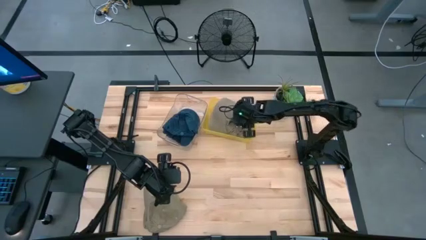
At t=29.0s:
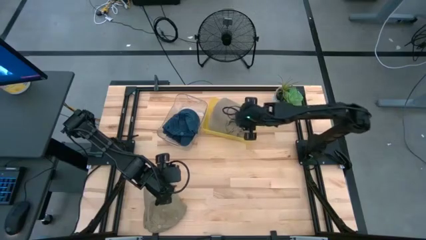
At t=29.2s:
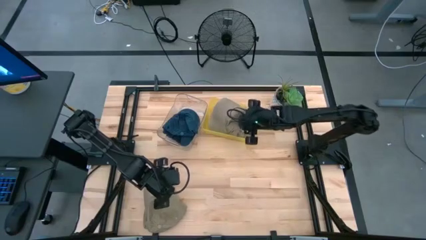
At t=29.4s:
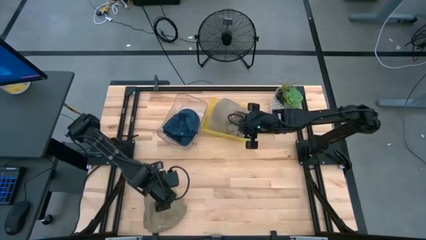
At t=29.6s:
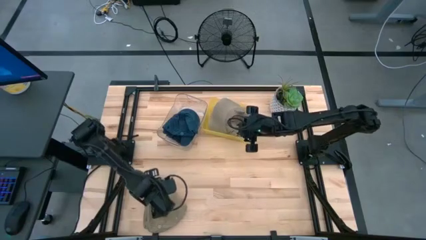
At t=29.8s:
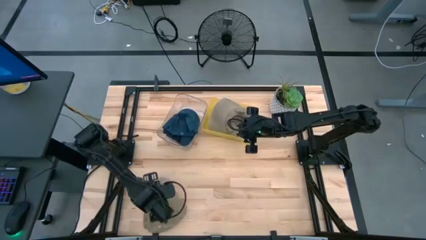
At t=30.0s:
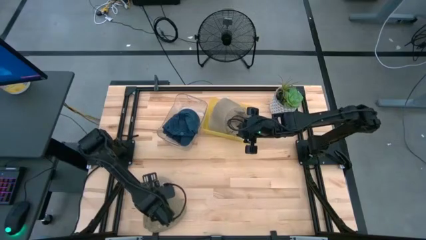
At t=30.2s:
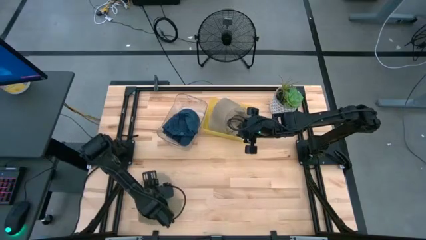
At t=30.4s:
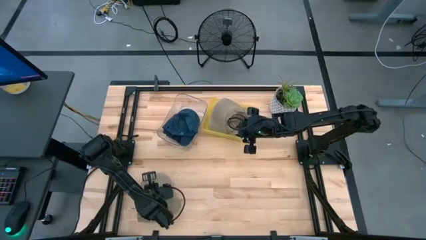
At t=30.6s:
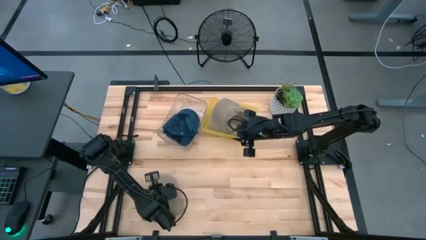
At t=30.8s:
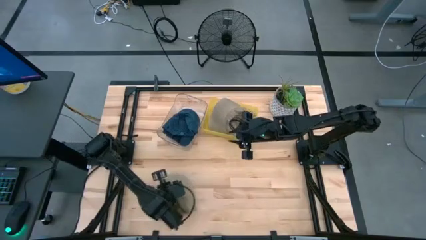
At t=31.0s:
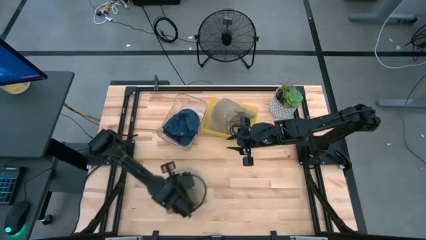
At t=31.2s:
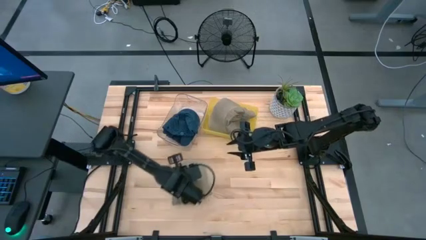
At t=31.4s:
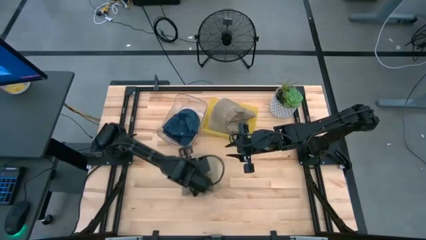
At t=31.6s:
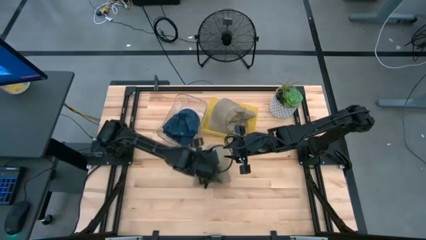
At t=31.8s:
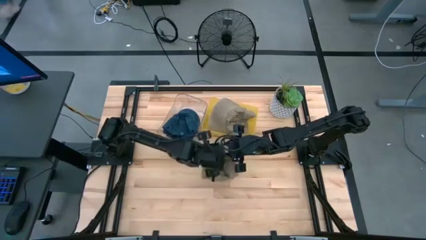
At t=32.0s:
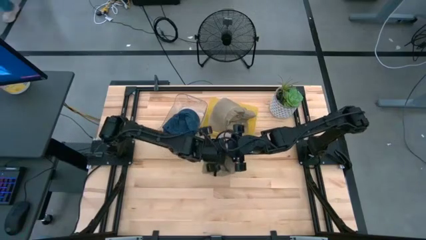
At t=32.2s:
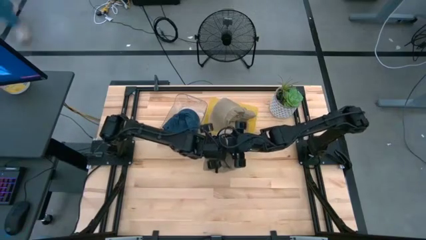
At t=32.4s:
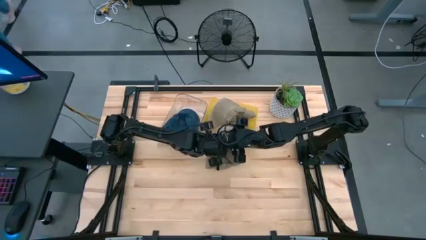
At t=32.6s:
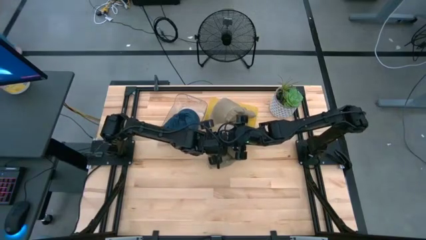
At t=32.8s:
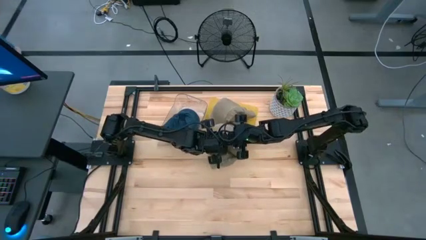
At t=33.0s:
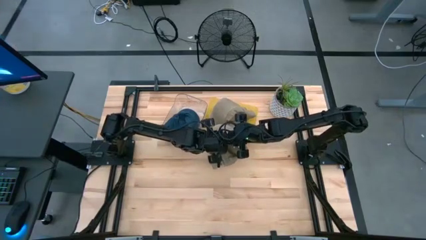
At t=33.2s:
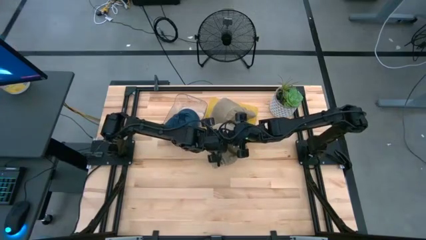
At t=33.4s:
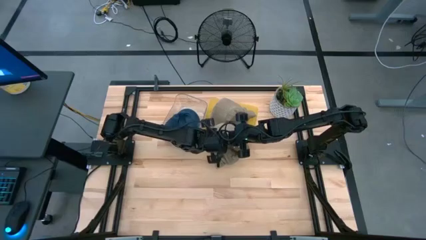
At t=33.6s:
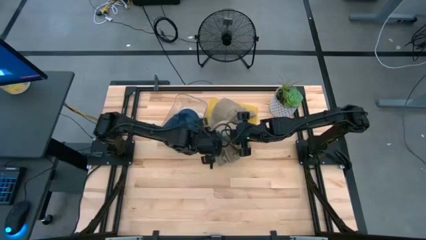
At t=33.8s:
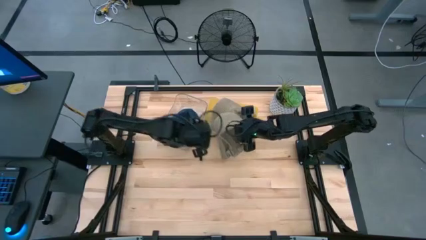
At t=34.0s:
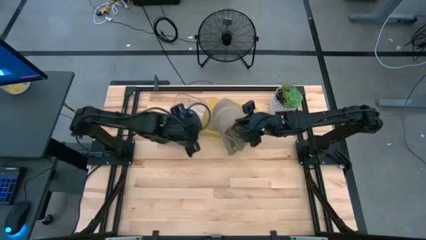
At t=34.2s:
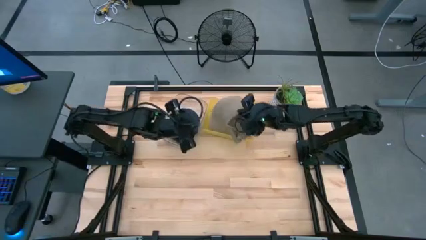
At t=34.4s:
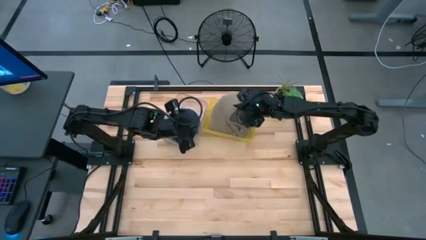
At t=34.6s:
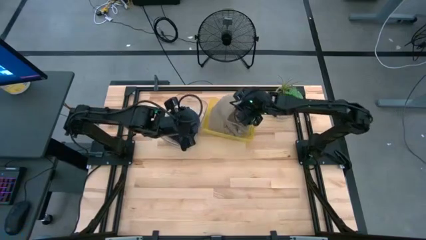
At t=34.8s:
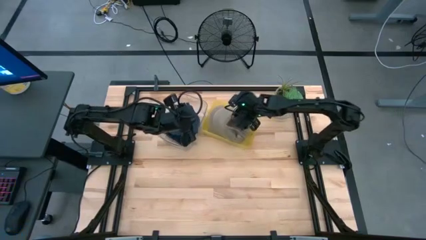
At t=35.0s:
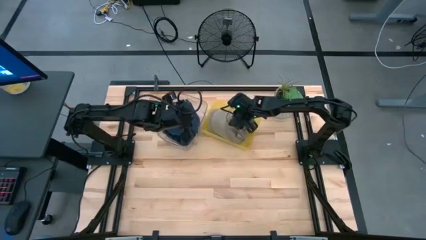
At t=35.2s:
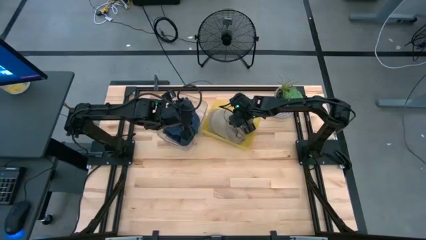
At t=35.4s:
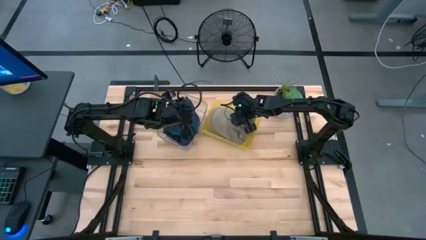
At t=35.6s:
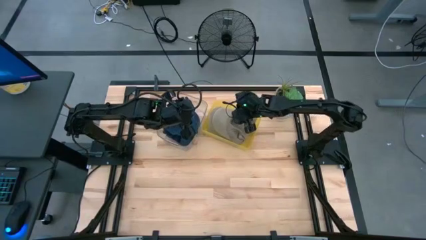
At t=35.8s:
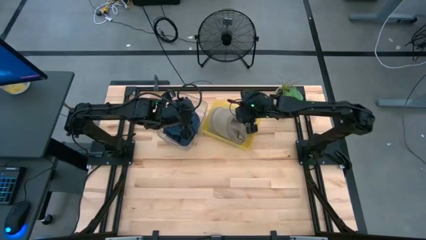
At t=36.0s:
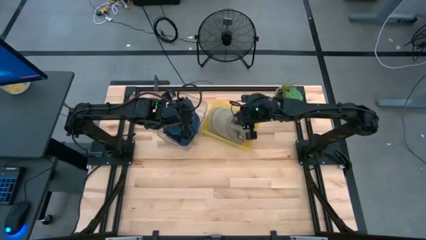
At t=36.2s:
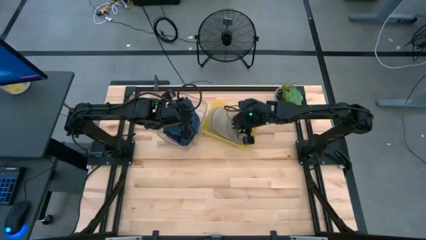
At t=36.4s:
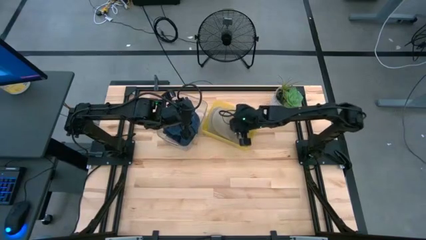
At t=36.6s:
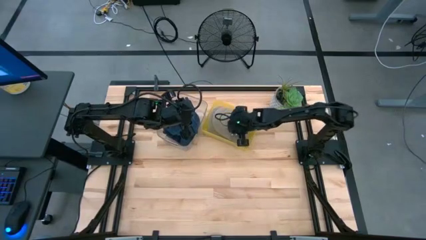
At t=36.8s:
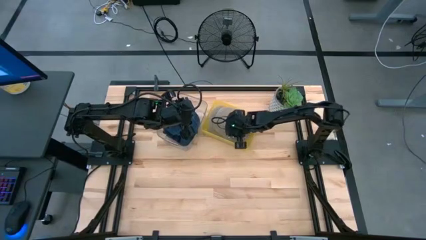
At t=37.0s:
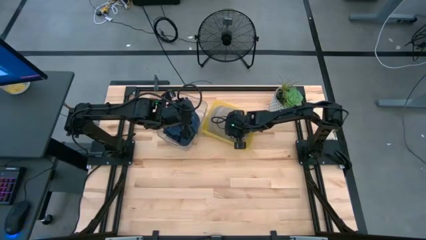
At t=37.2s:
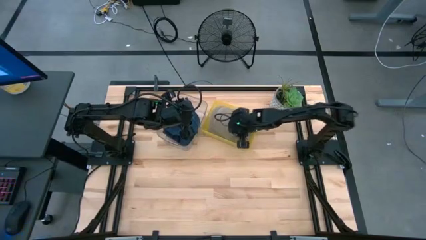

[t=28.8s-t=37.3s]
Task: Pick & Place hat
Put the brown cap into the yellow bin

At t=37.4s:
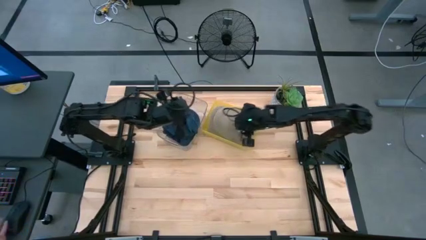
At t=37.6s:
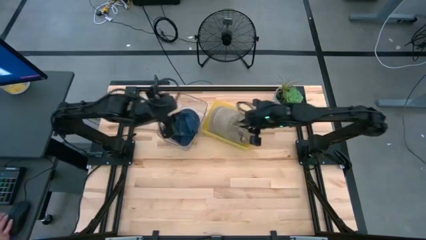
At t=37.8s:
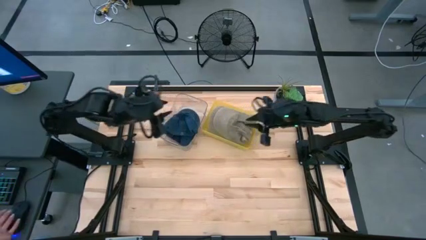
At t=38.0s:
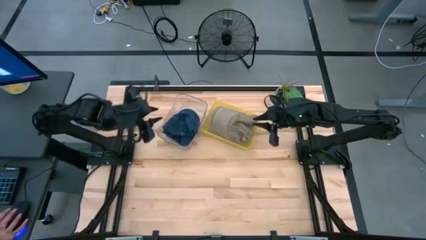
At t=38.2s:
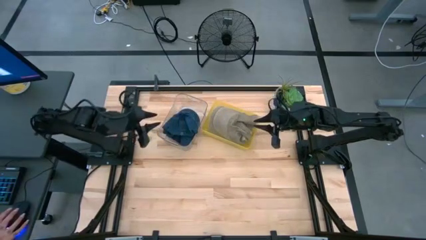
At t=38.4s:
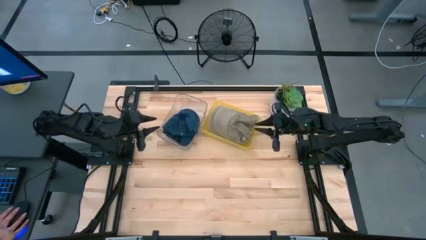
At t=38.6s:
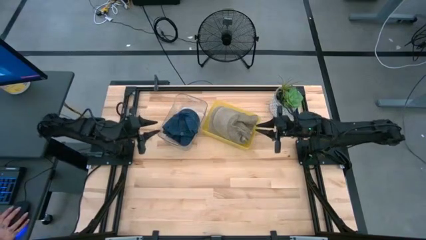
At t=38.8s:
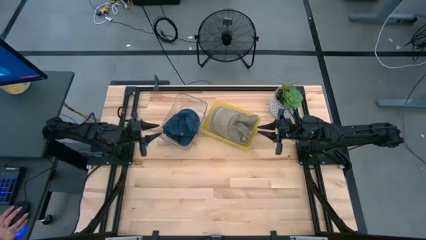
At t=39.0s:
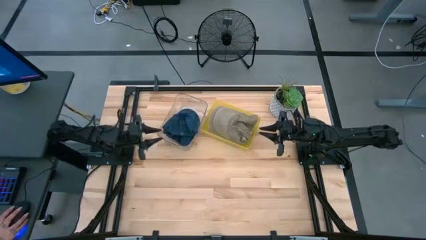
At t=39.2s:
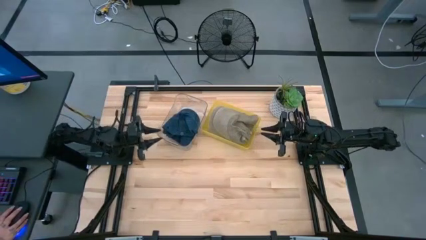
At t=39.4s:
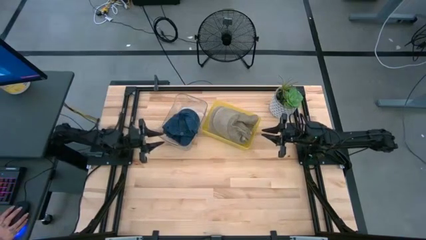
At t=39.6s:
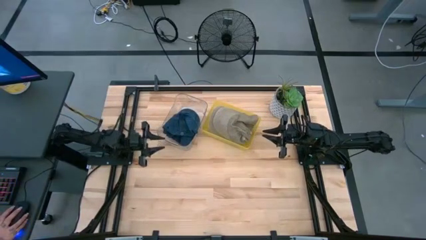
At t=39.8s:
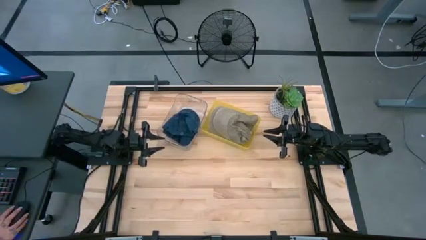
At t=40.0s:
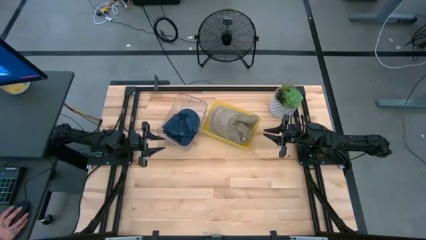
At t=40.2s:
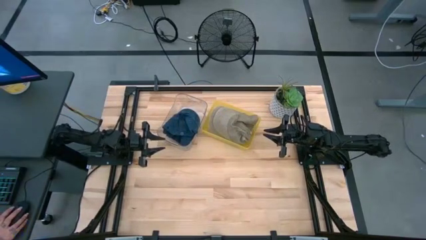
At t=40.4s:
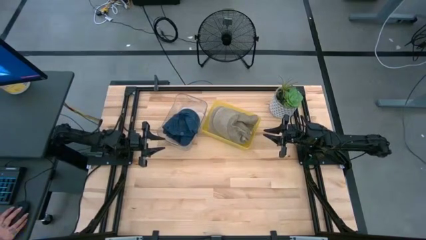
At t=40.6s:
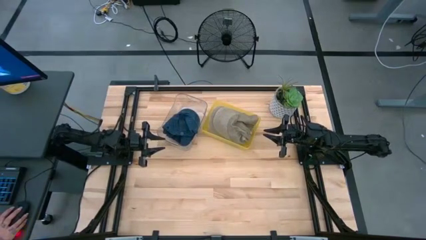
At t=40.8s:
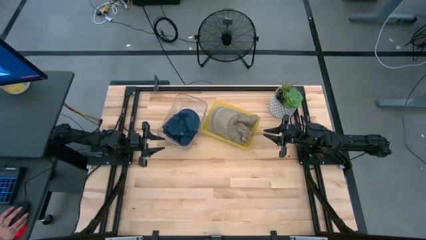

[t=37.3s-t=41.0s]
Return to Home Position
